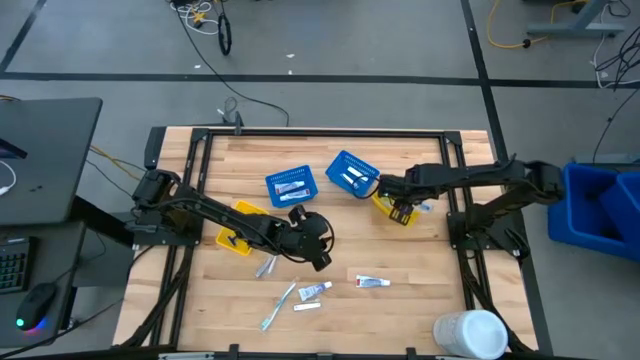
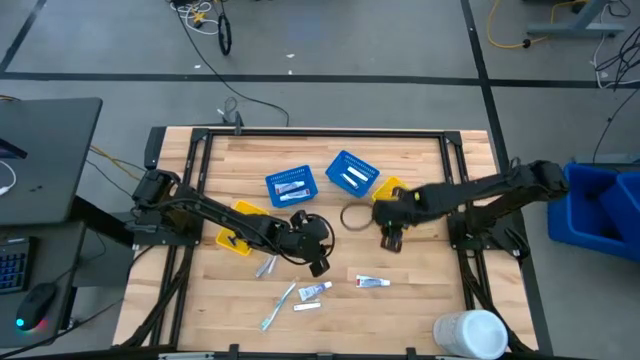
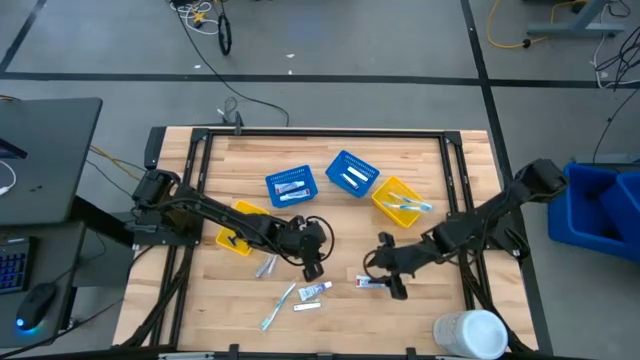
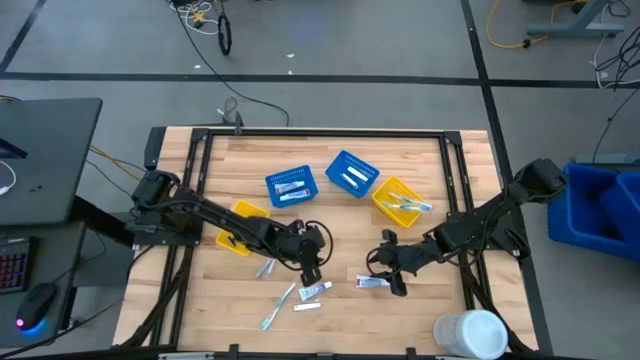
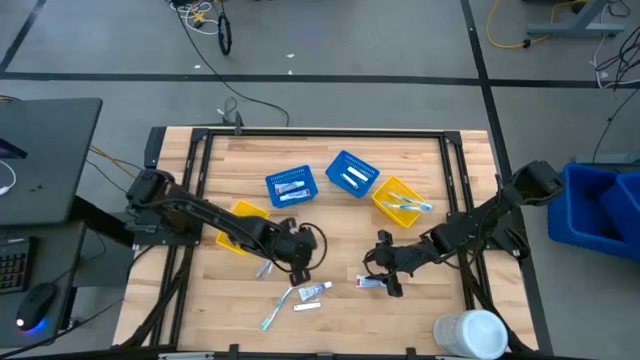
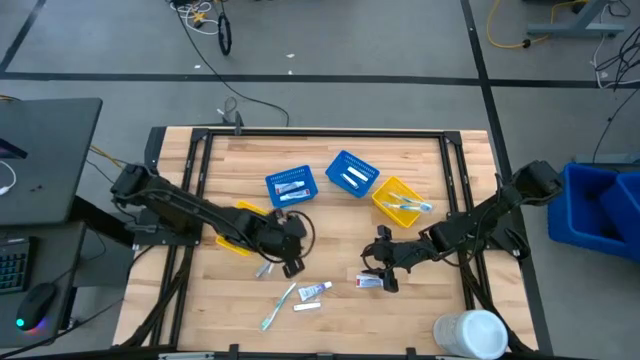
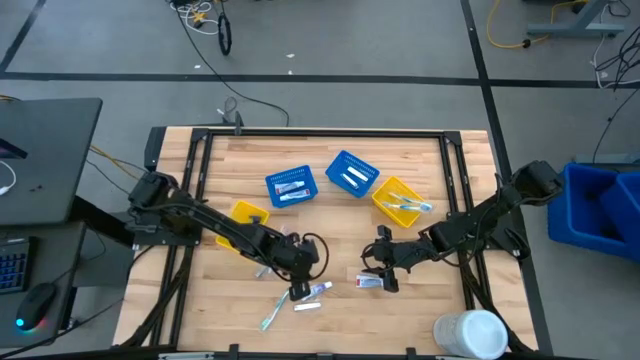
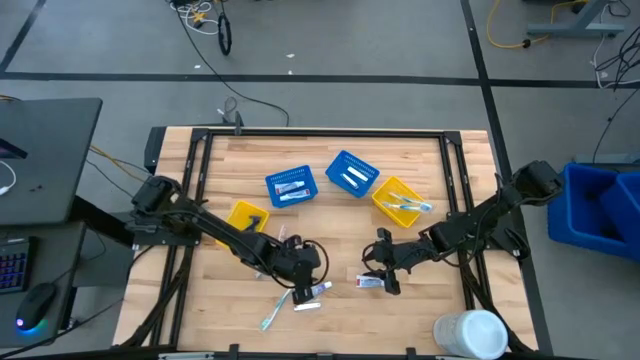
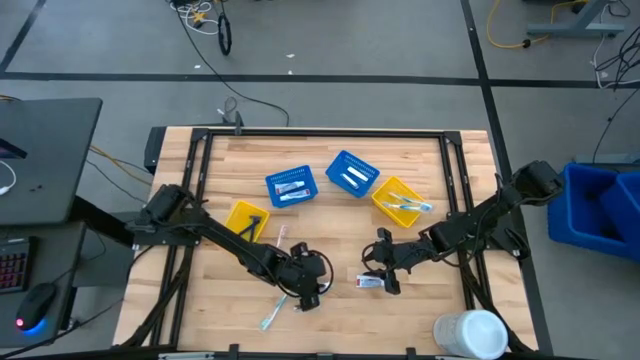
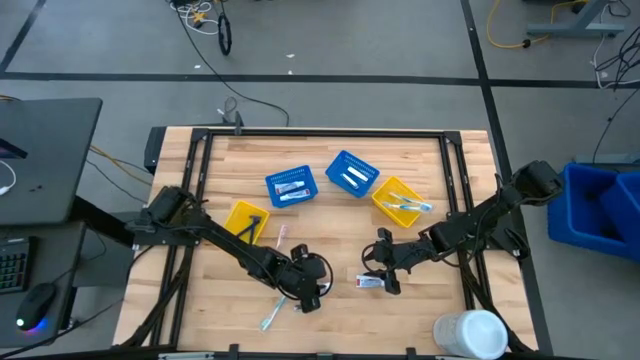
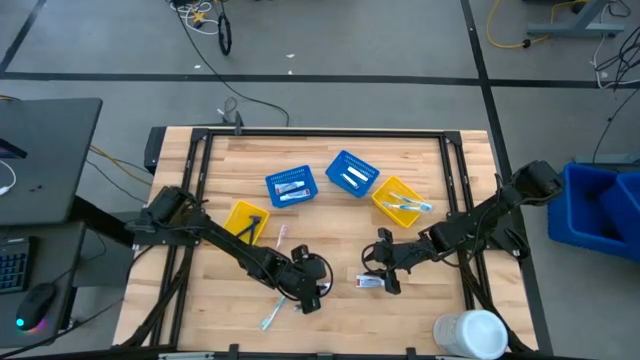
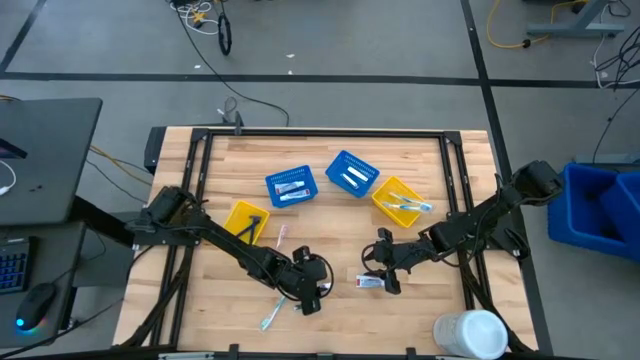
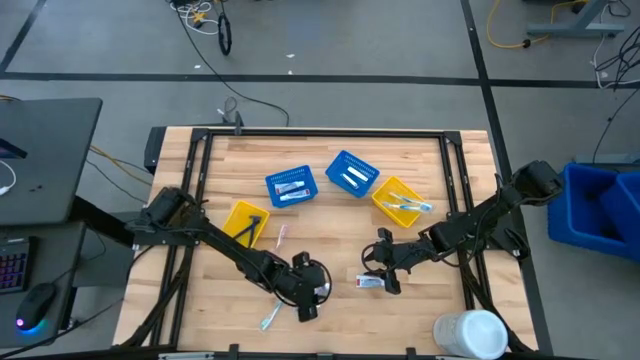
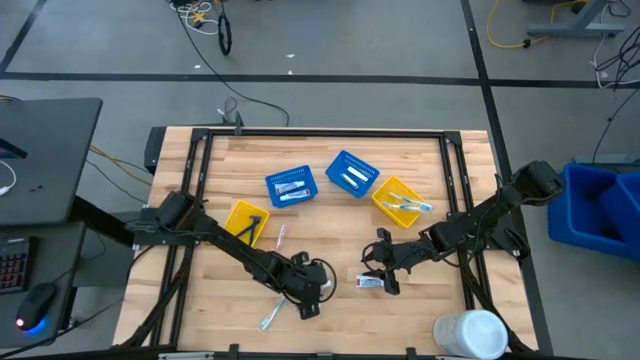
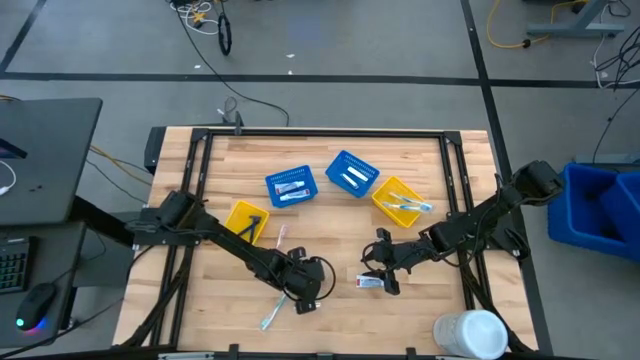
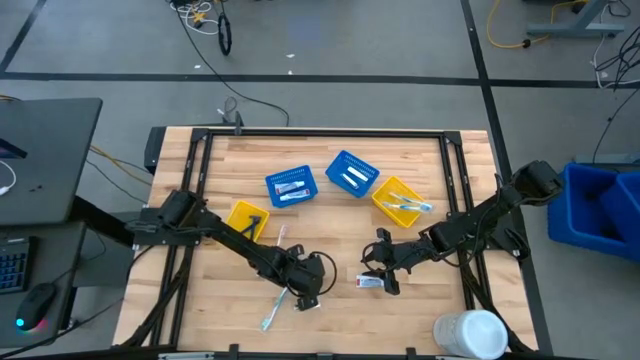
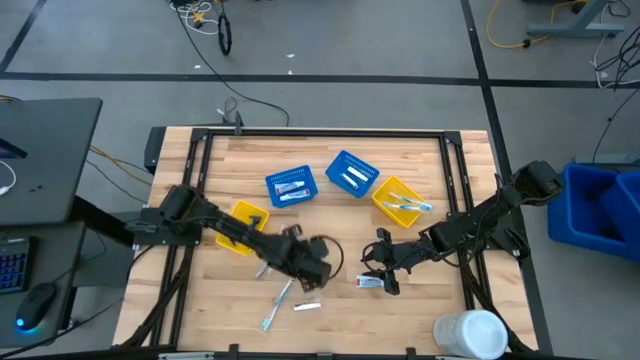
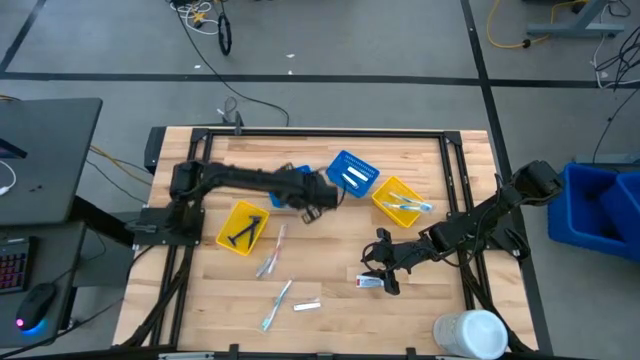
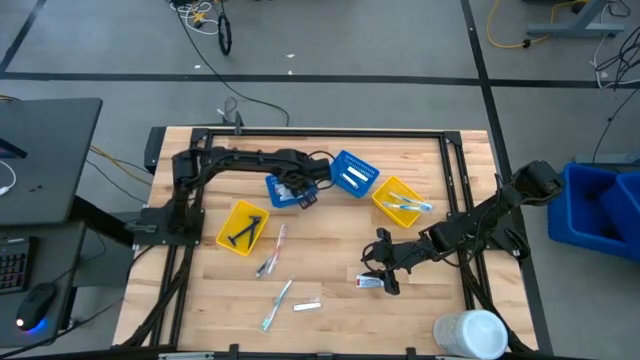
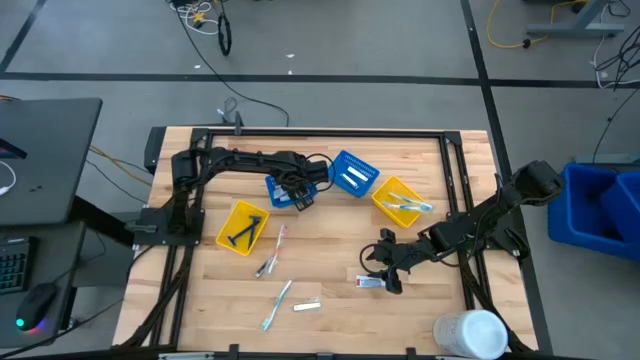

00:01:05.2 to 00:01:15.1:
Task: Pick & Place Travel size toiletries
Put the white toothpaste into the left blue bin

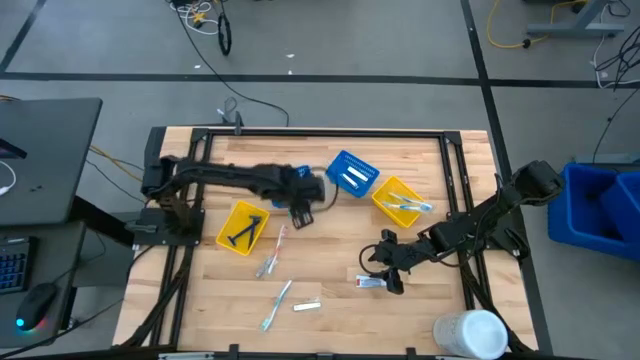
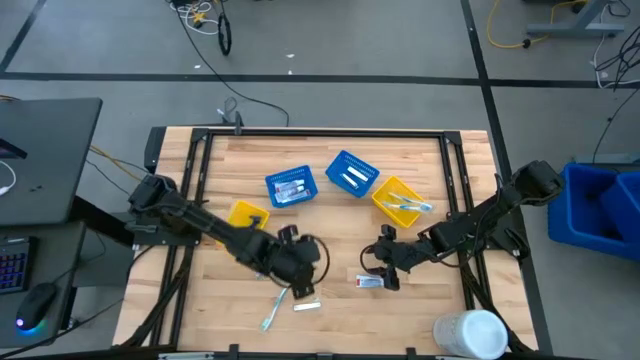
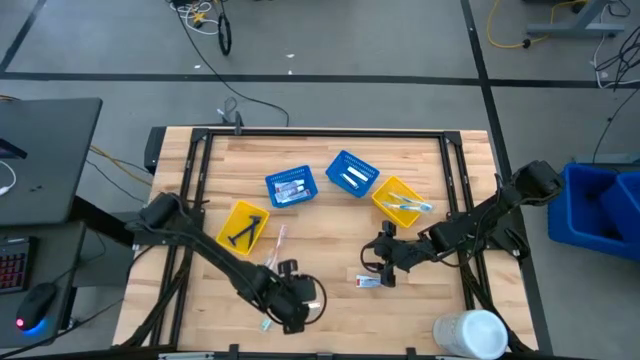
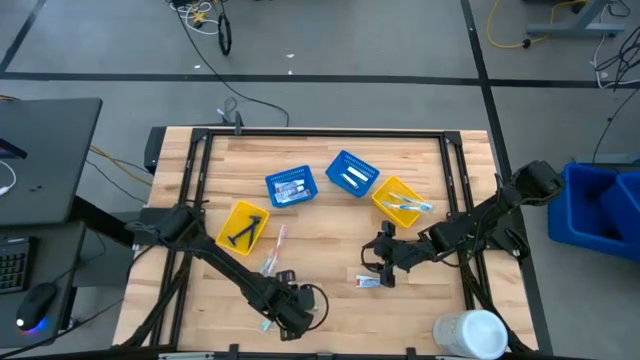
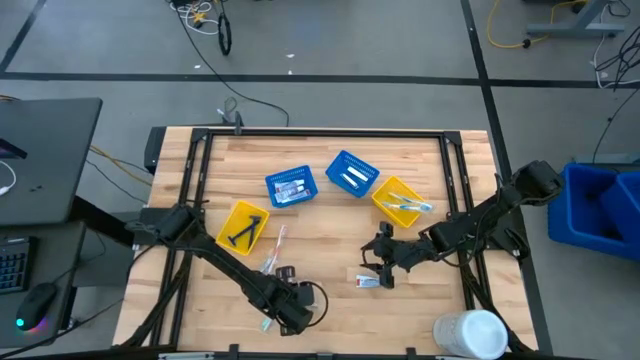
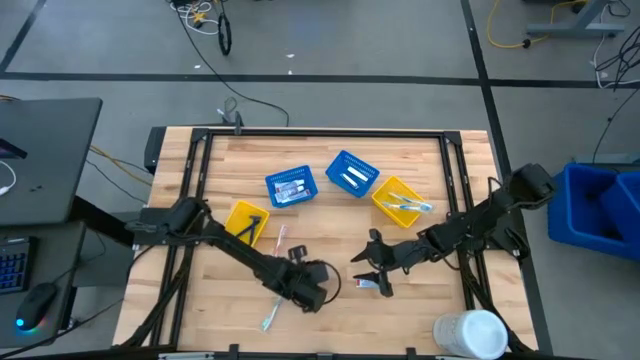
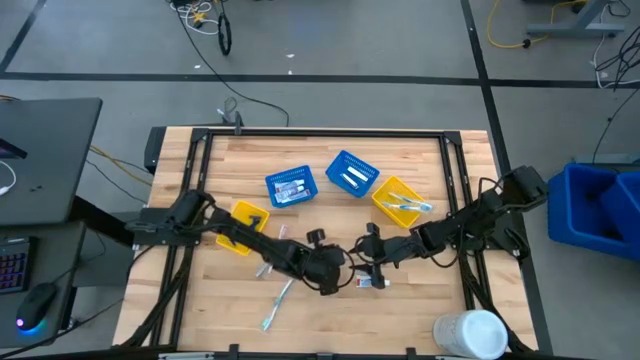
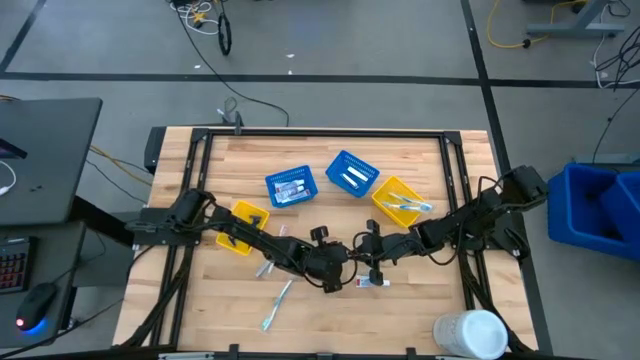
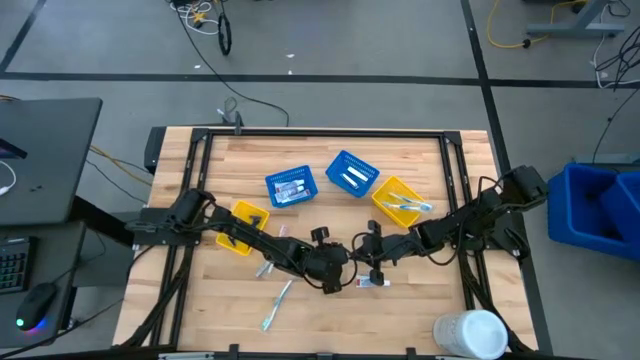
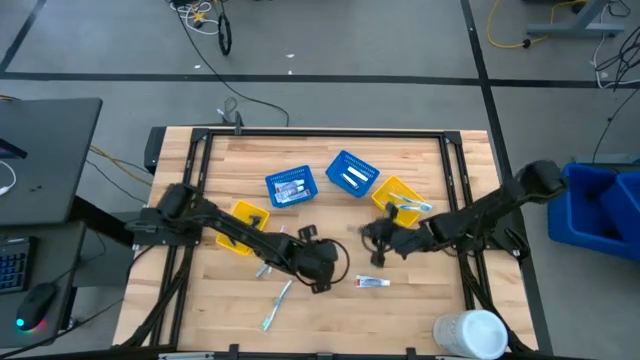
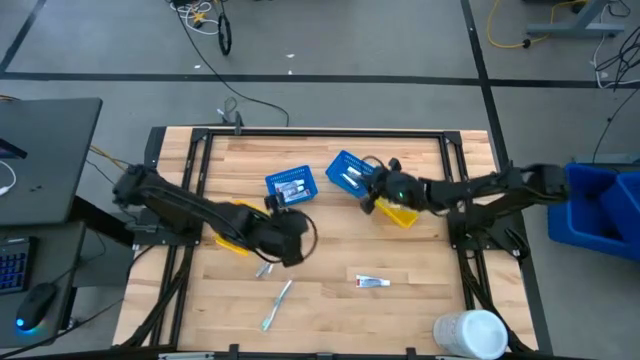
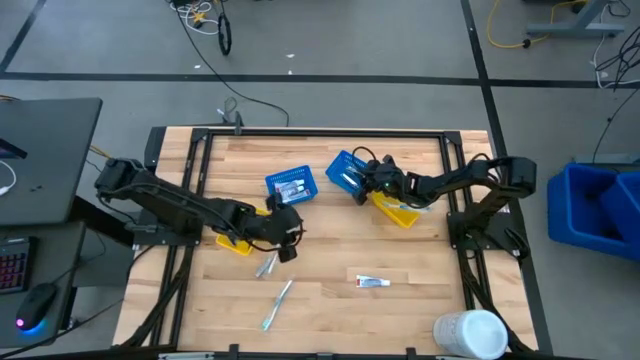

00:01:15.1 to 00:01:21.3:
Put the silver nail cutter into the right blue bin

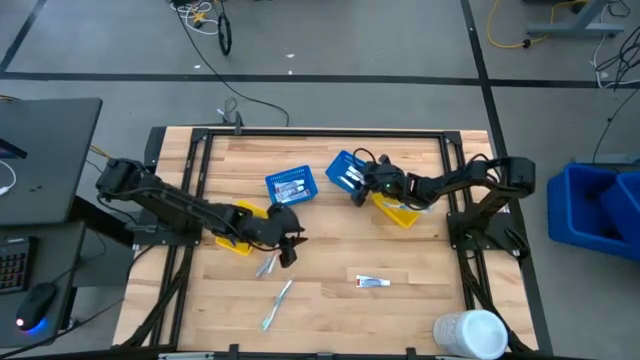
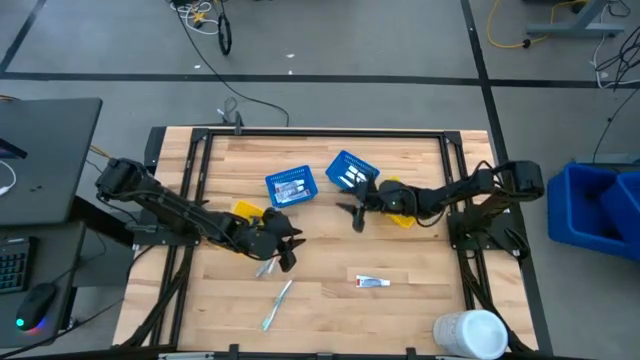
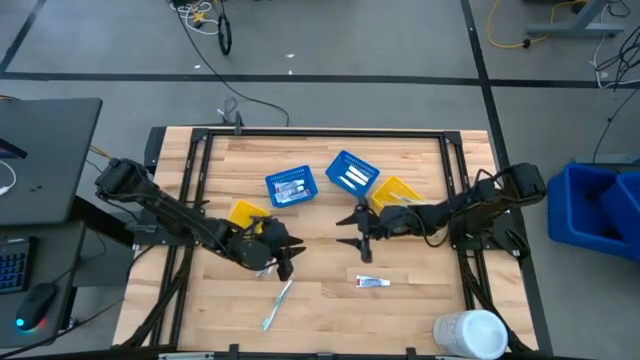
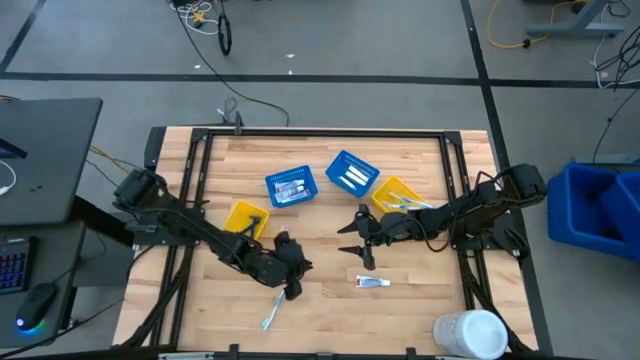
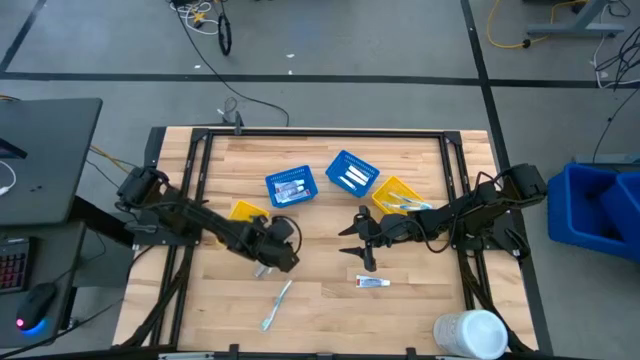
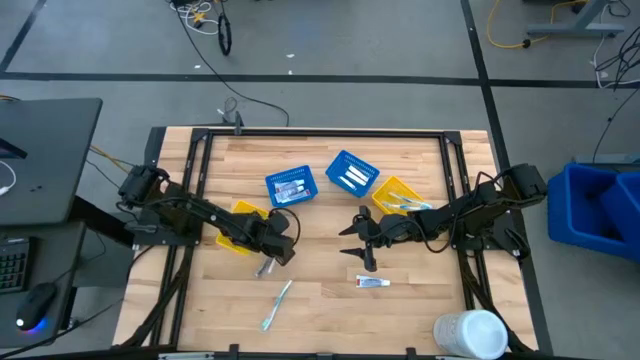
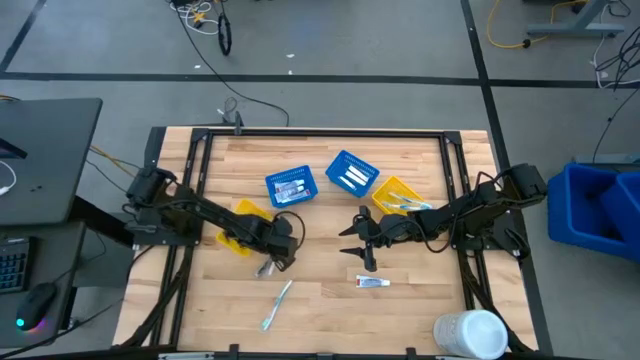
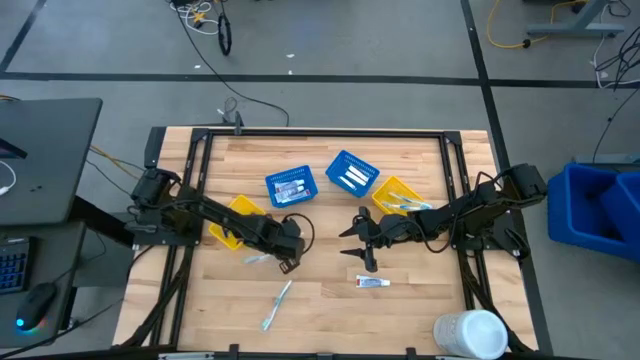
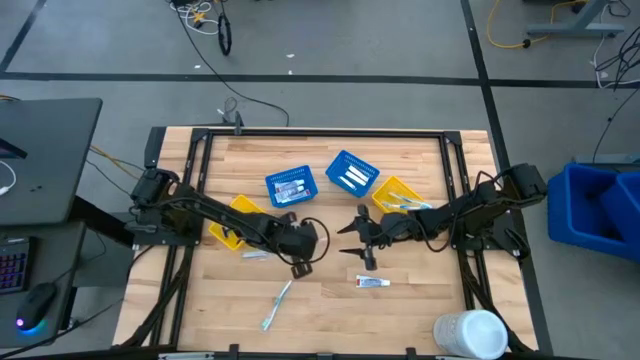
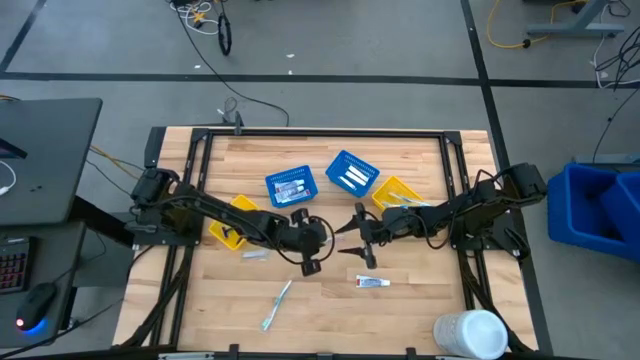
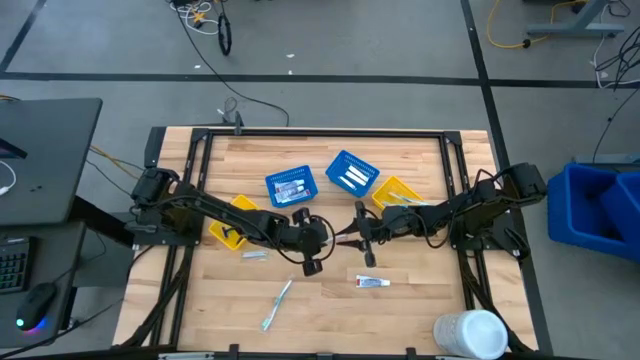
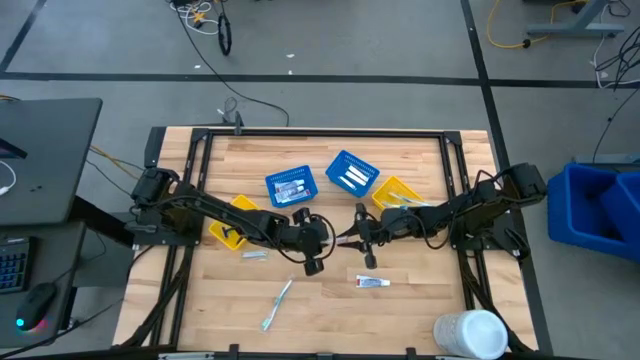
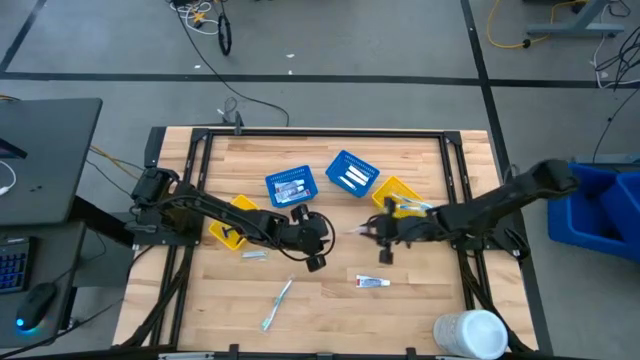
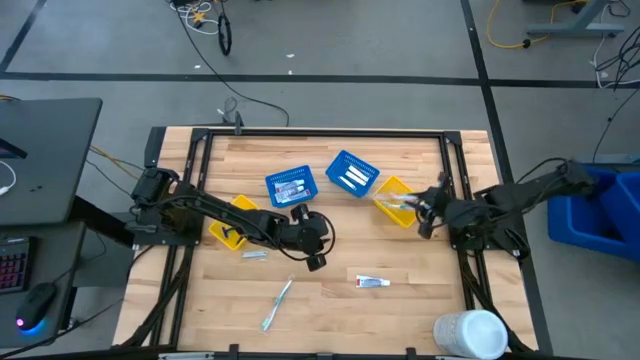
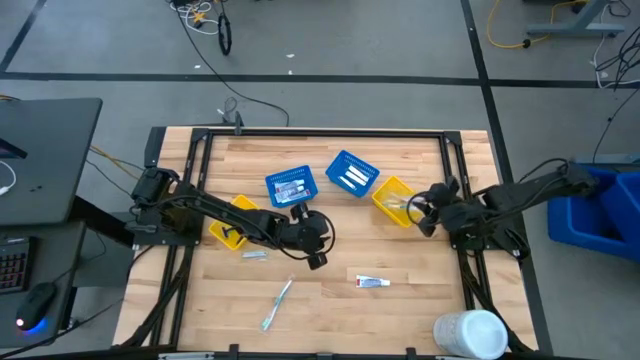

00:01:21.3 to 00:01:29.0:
Put the red toothbrush into the right yellow bin
